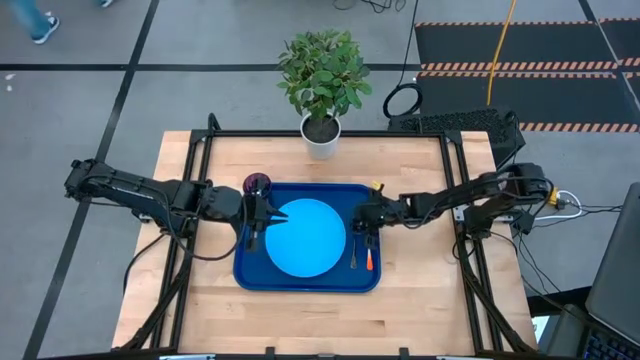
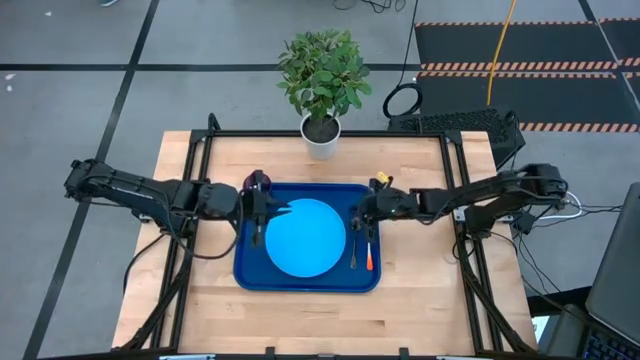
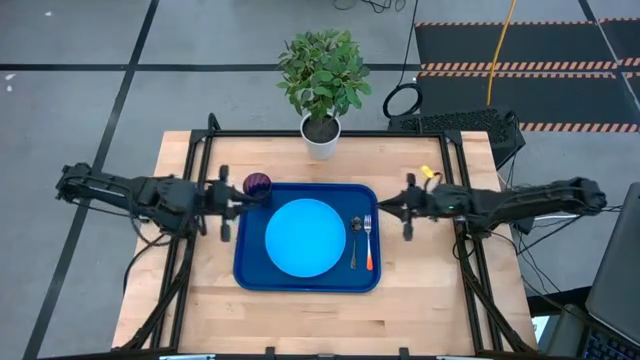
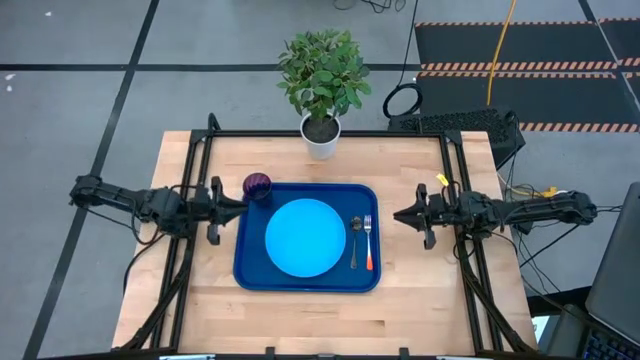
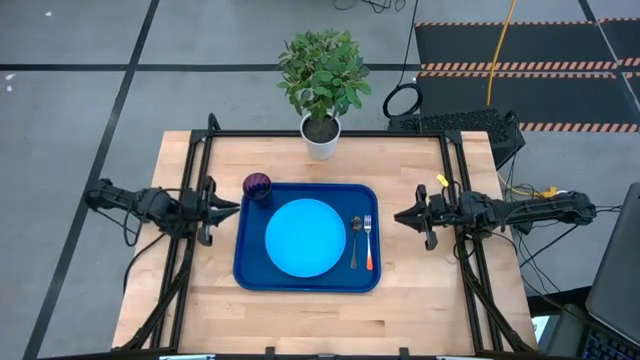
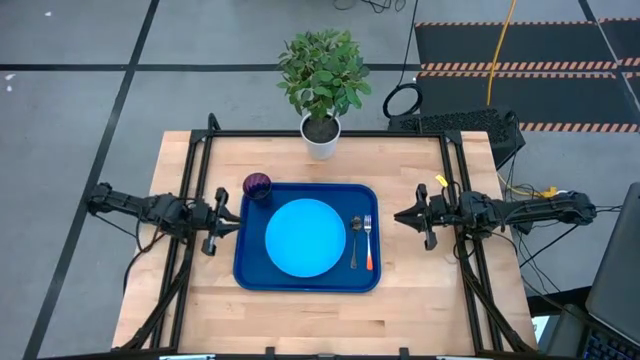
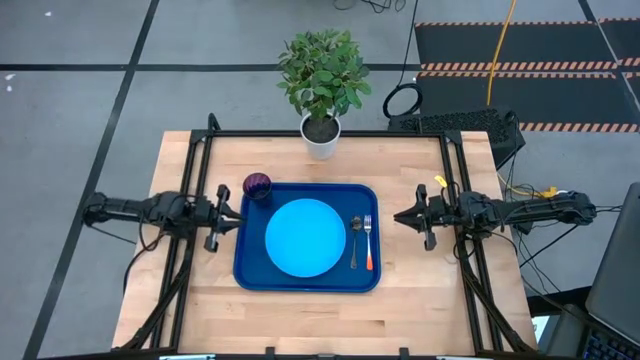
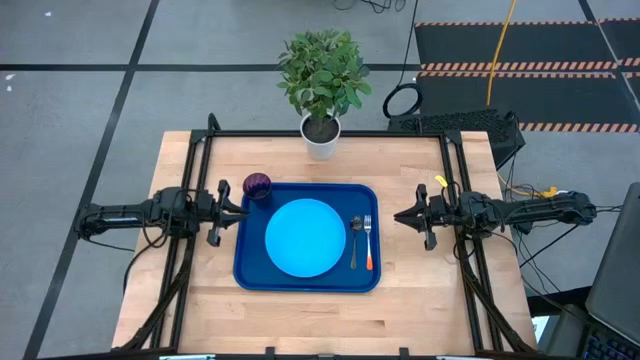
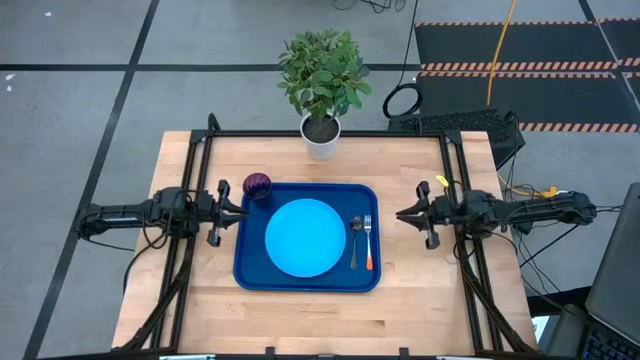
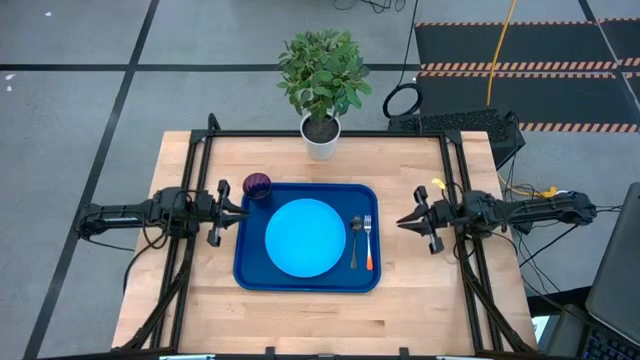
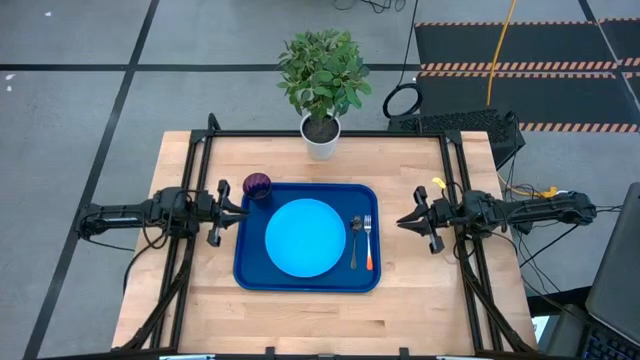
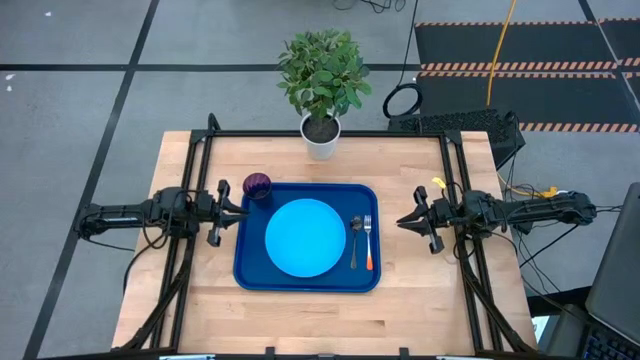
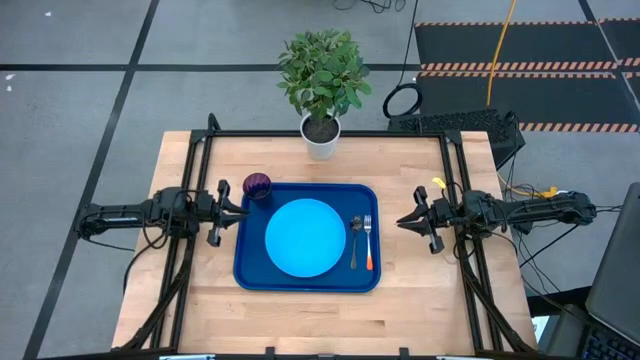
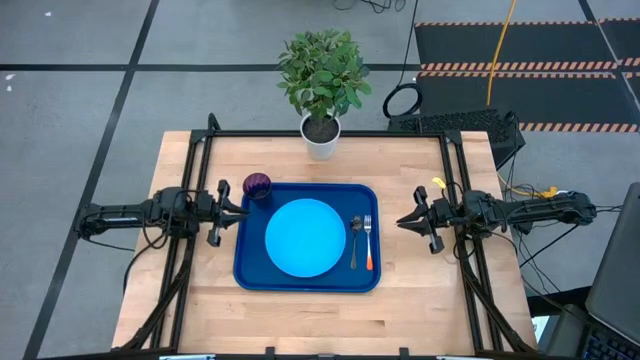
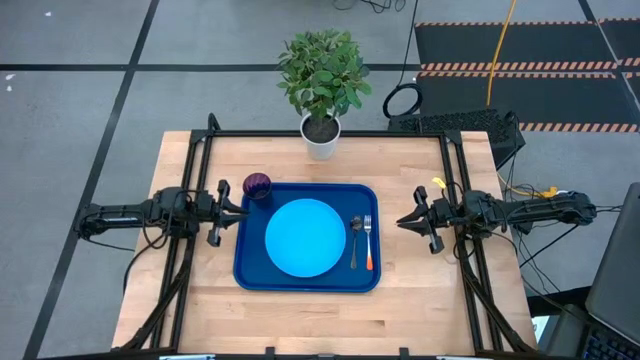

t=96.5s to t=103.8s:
Task: Pick and place plate/cup/fork/spoon on tray
Return to Home Position

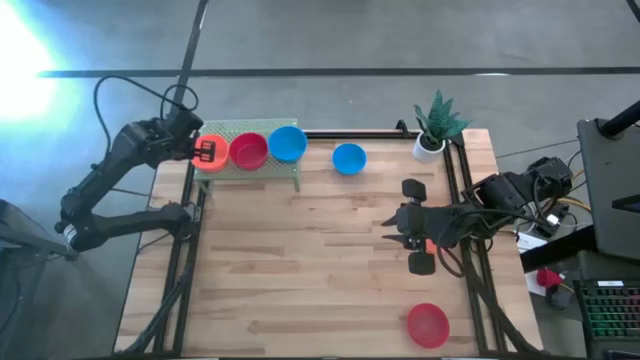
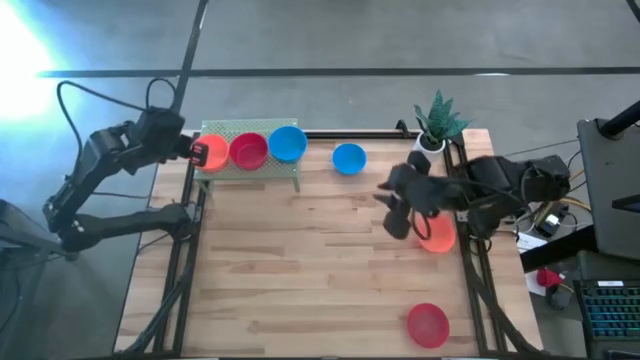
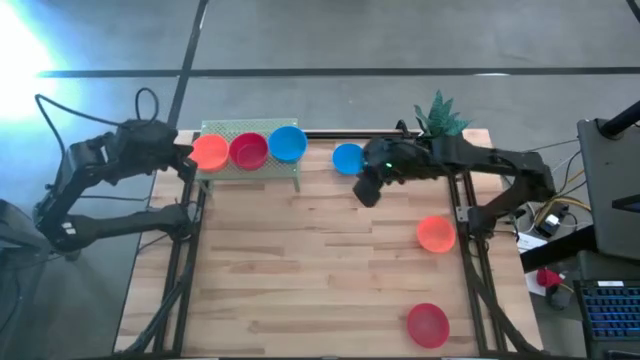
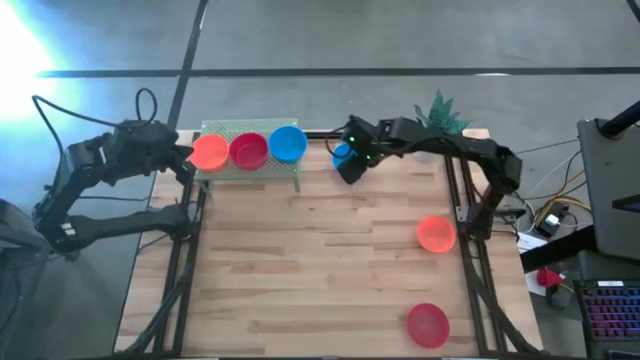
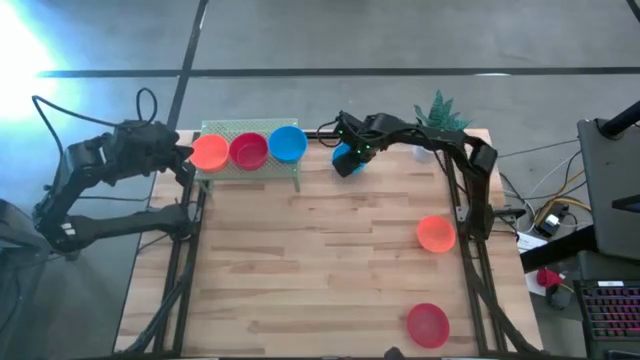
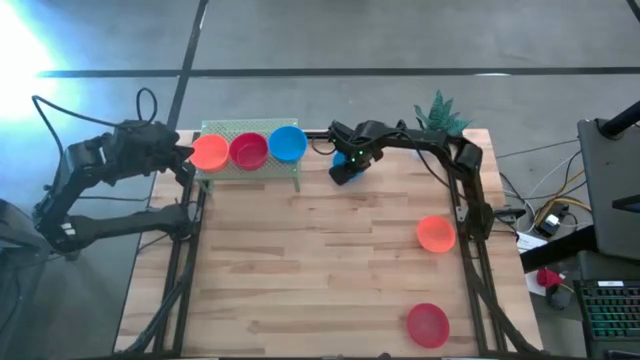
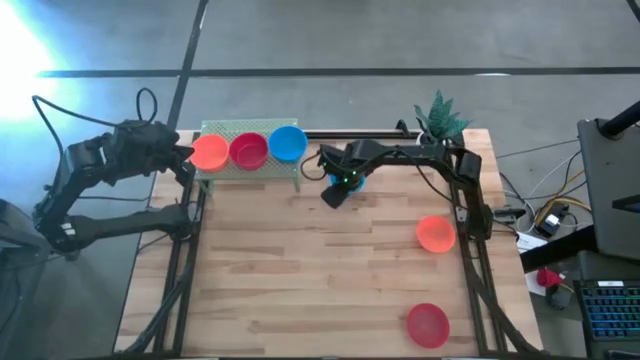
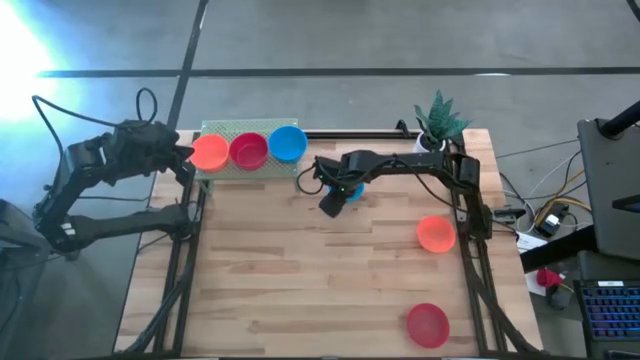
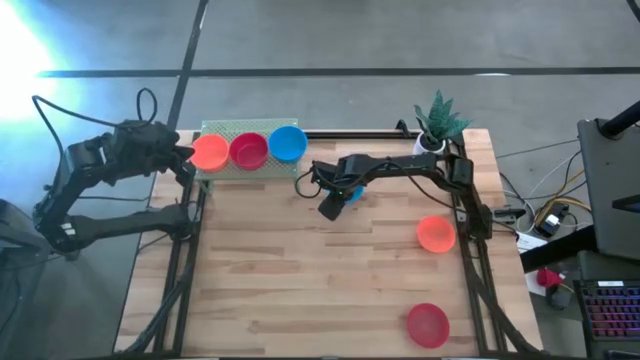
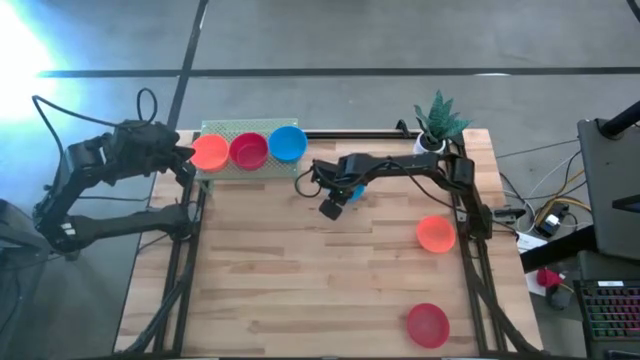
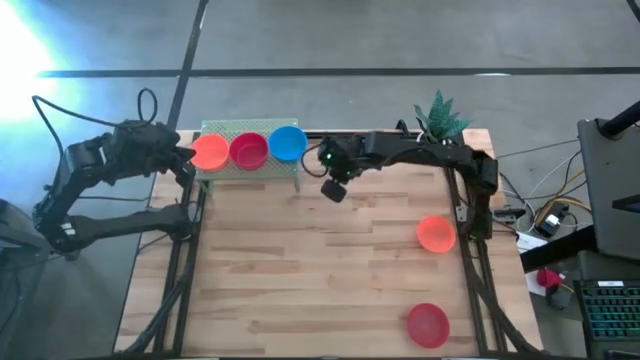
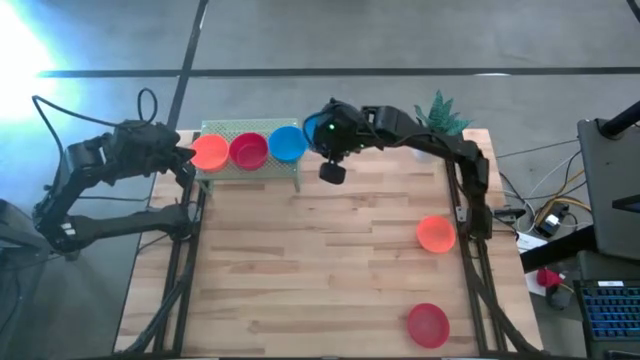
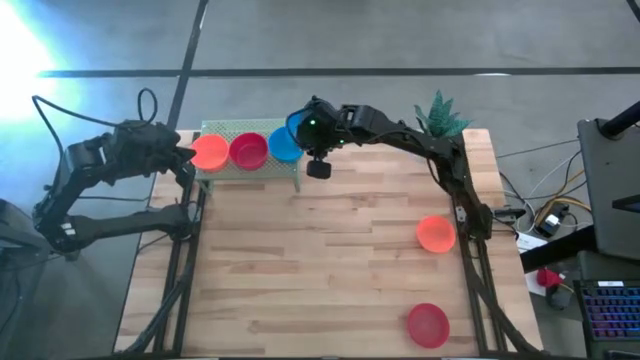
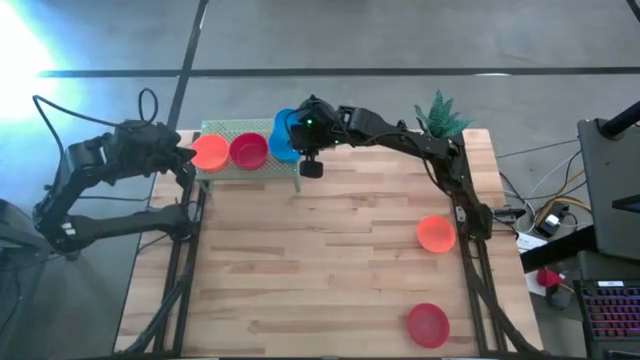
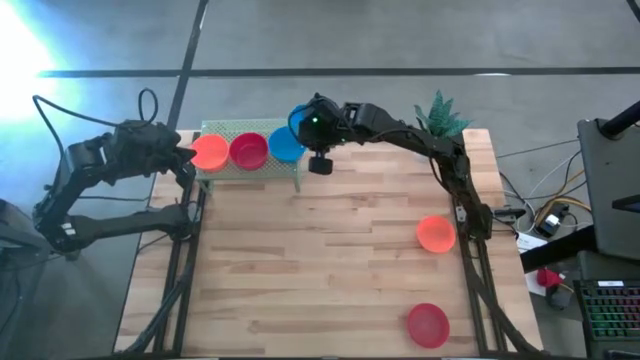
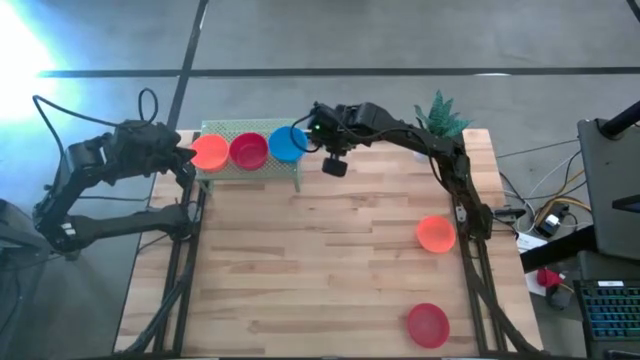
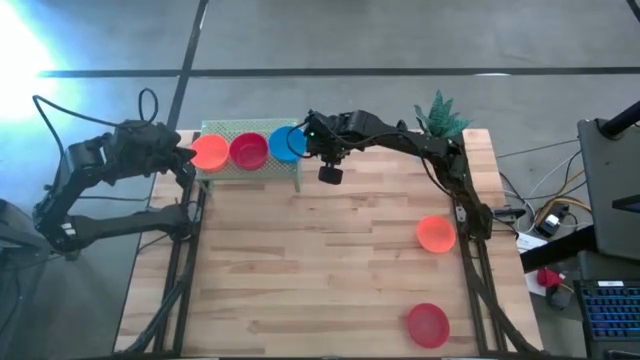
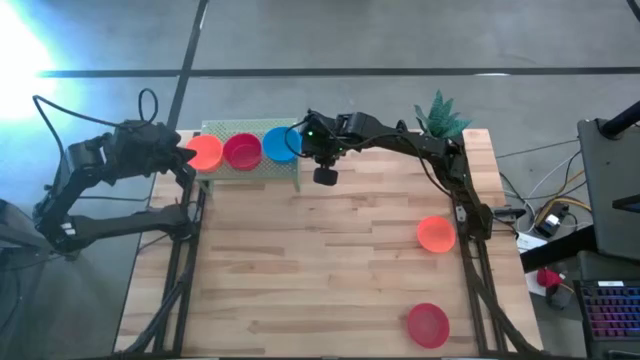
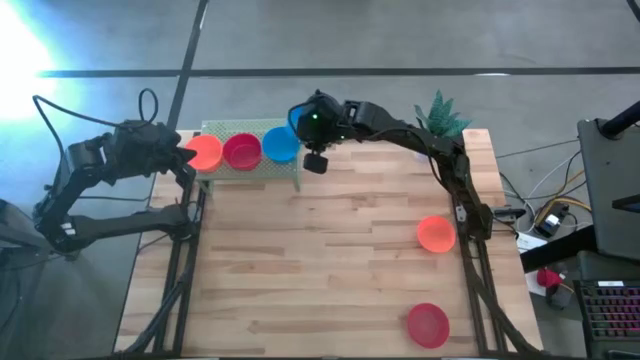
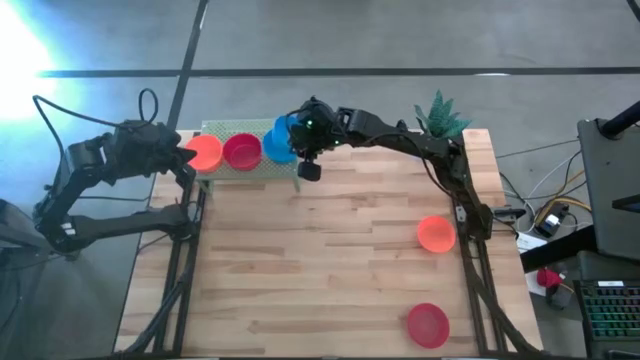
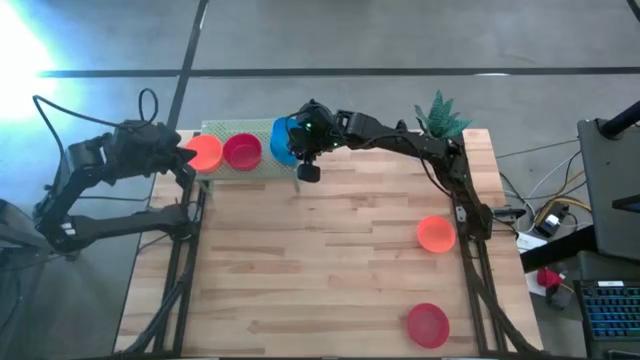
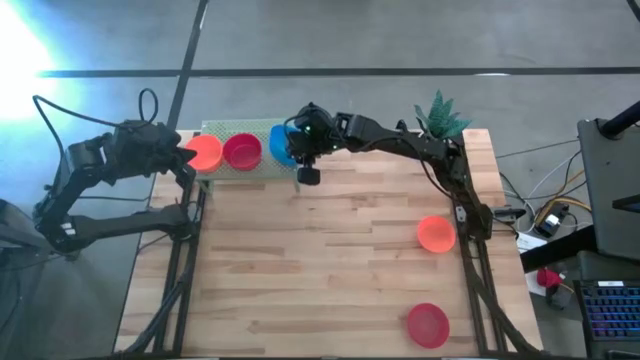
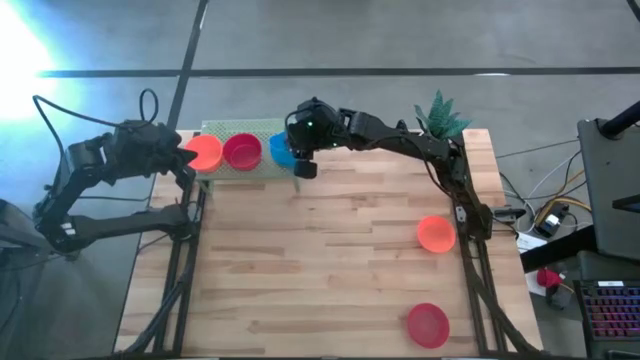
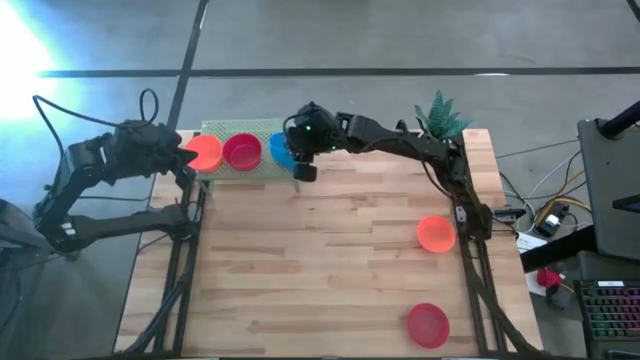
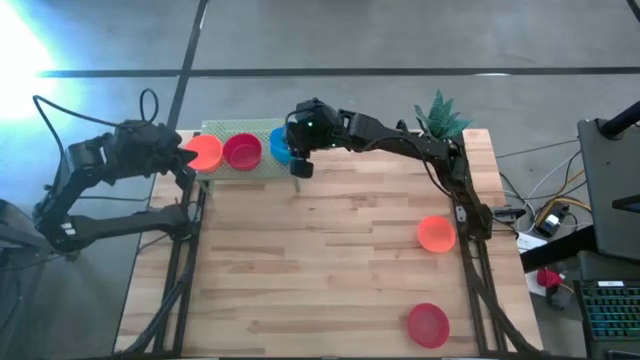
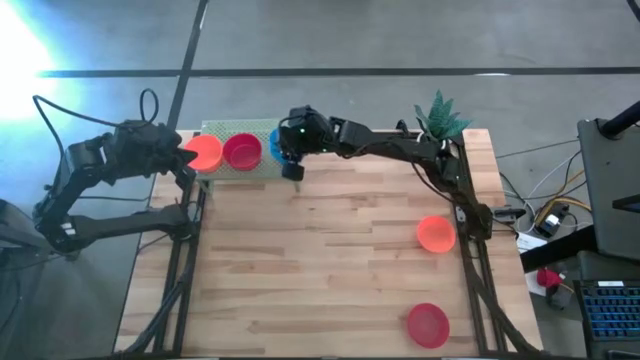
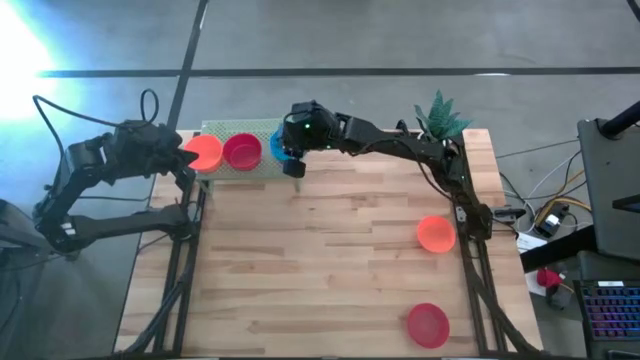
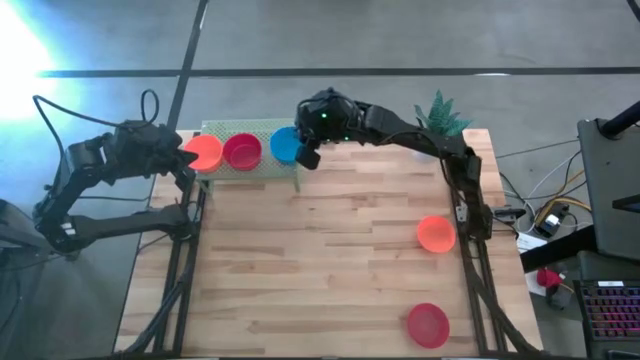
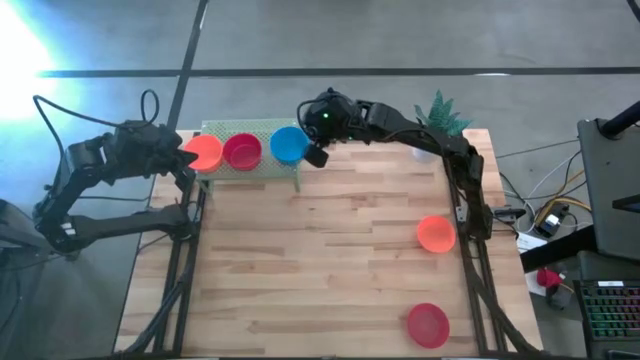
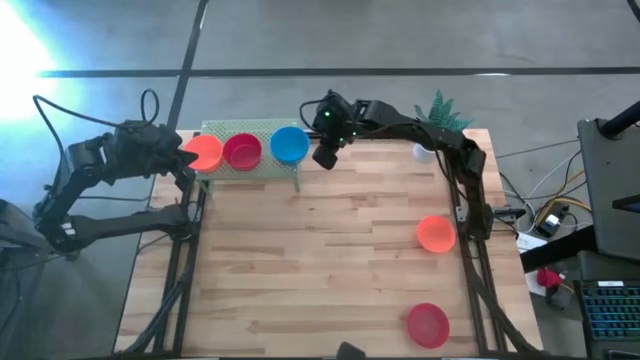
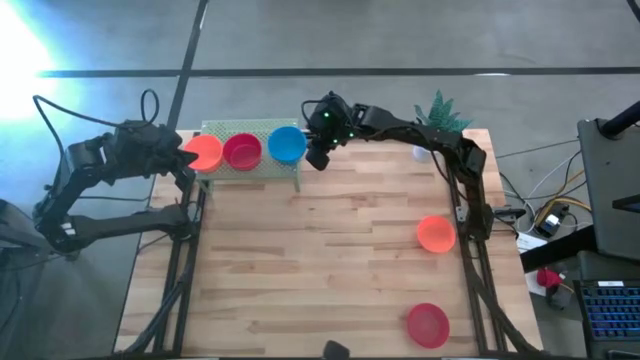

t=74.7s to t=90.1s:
Task: Pick & Place Mini bowls
Stack the blue bowl on top of the other blue bowls on the shelf
